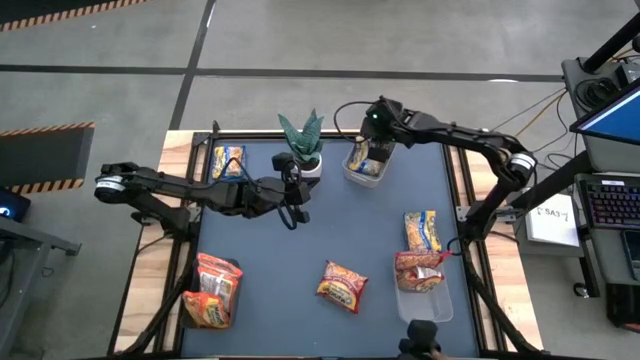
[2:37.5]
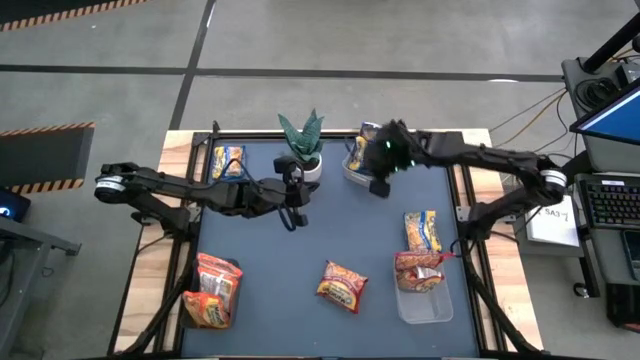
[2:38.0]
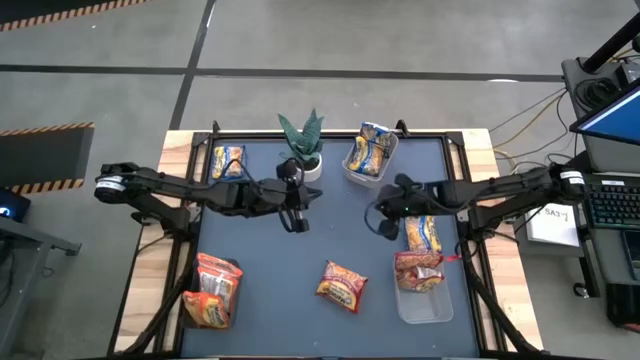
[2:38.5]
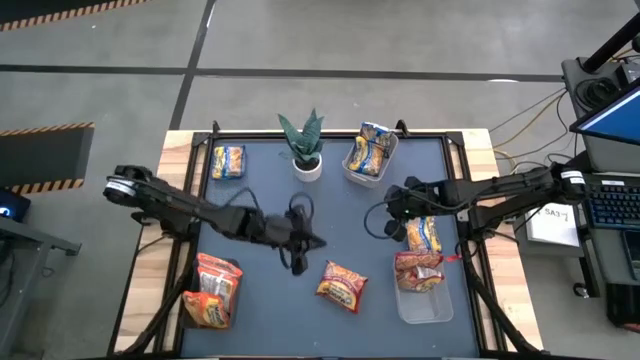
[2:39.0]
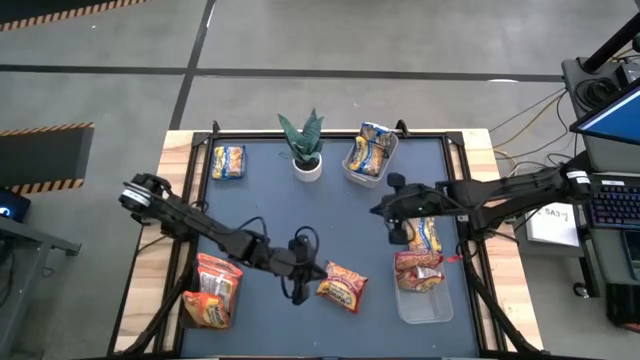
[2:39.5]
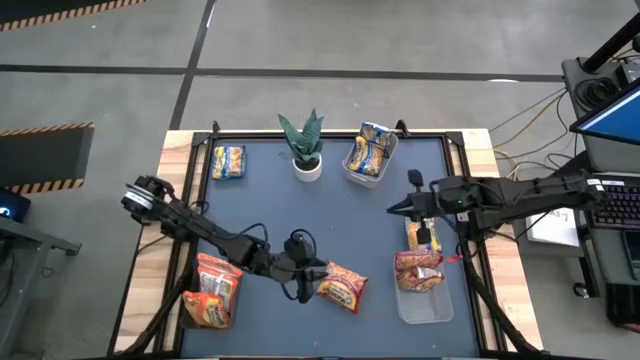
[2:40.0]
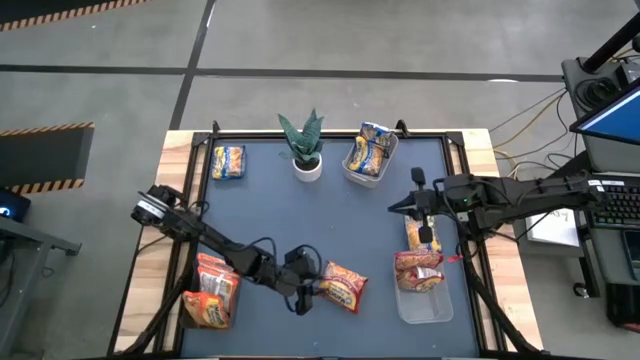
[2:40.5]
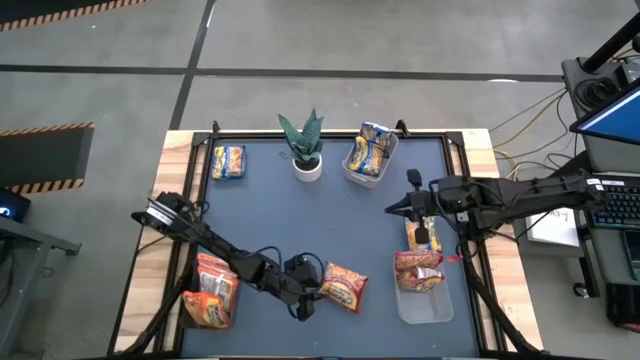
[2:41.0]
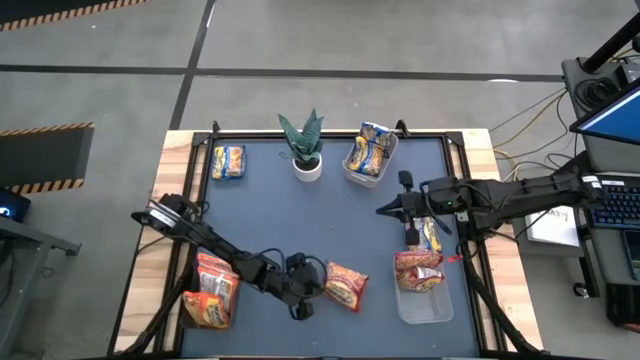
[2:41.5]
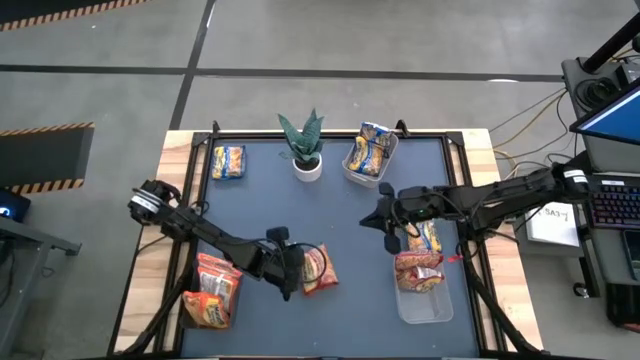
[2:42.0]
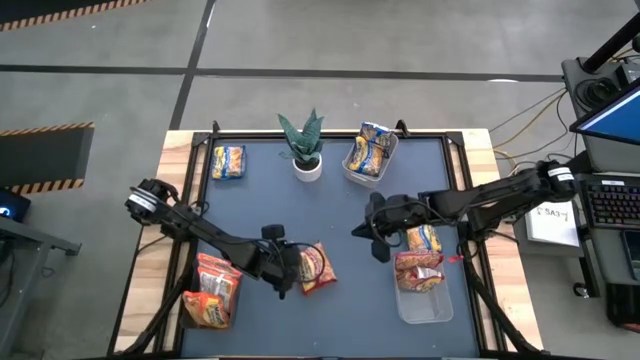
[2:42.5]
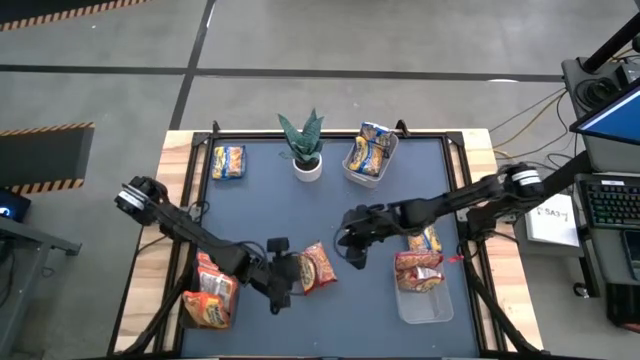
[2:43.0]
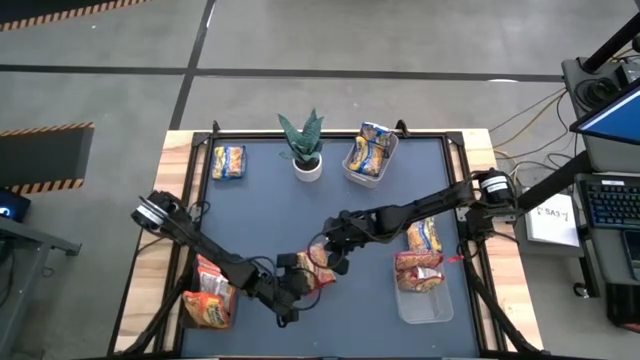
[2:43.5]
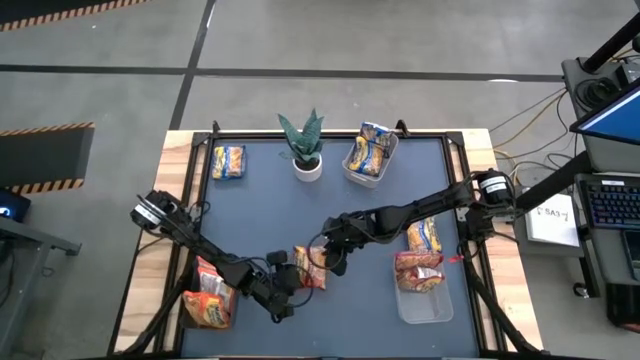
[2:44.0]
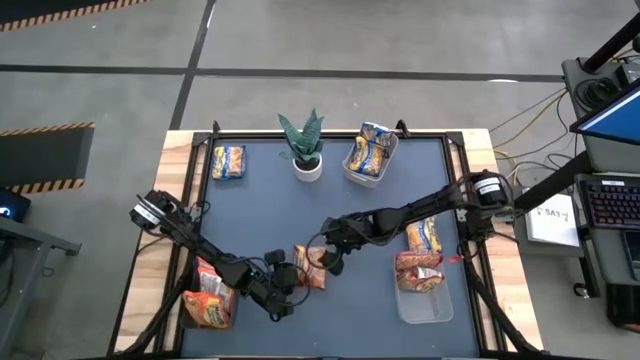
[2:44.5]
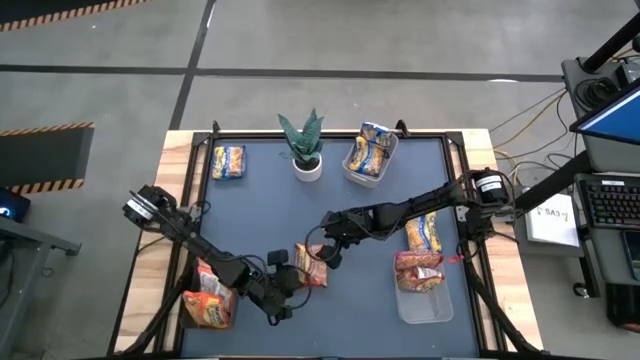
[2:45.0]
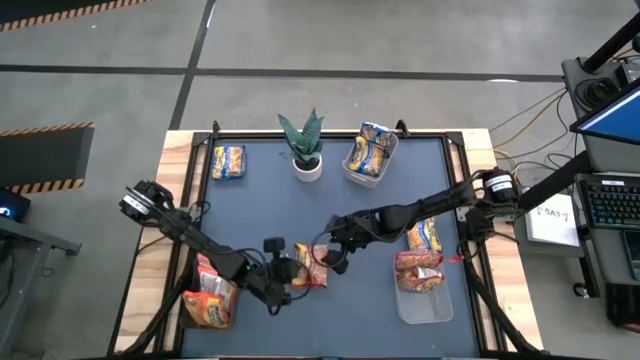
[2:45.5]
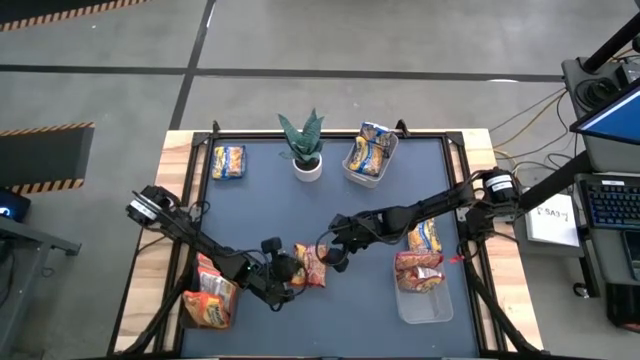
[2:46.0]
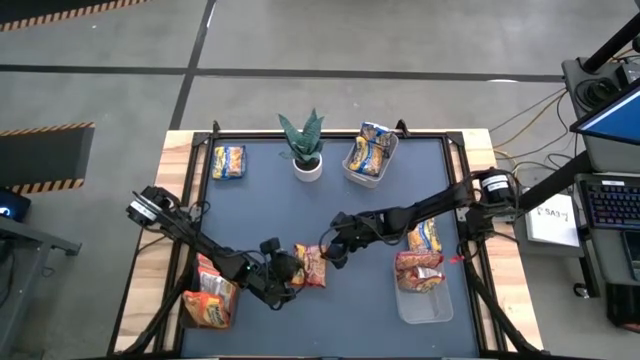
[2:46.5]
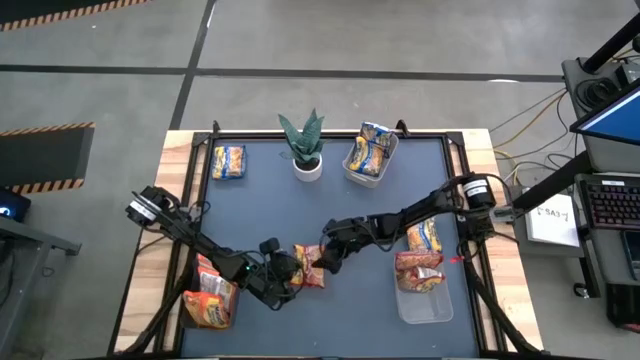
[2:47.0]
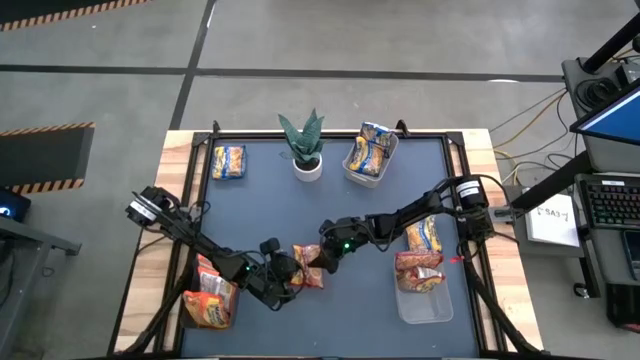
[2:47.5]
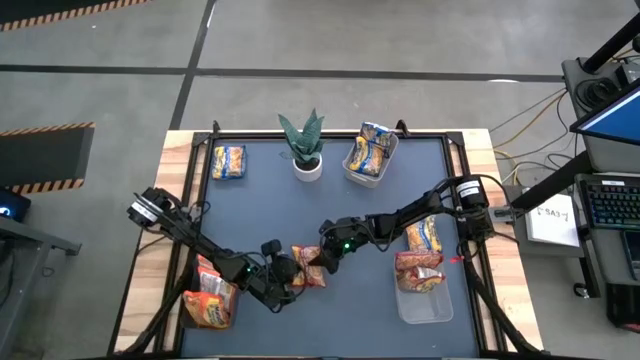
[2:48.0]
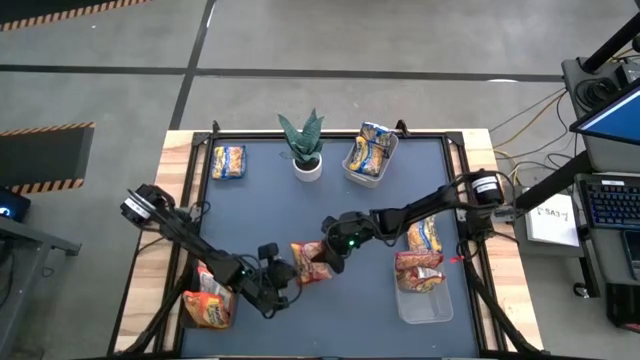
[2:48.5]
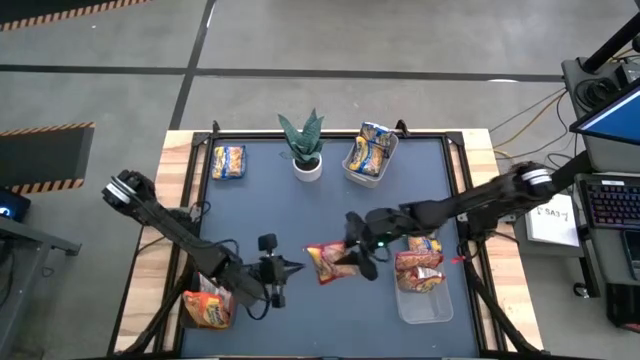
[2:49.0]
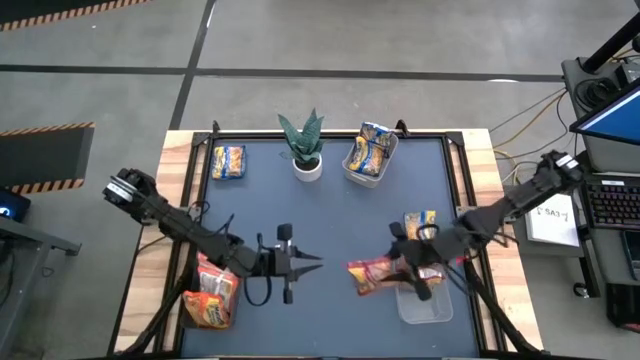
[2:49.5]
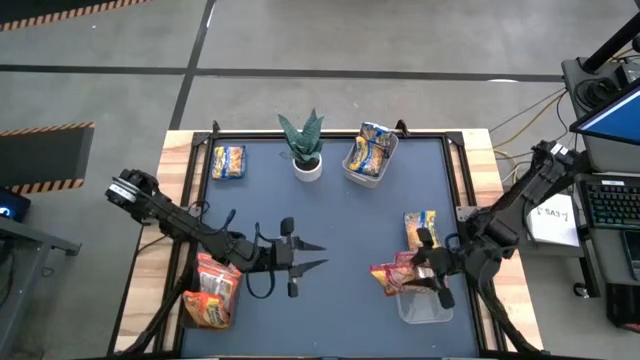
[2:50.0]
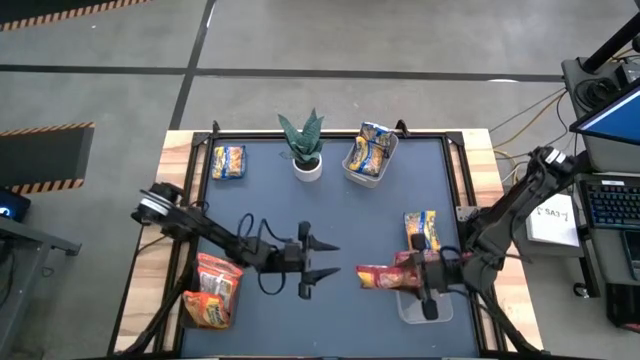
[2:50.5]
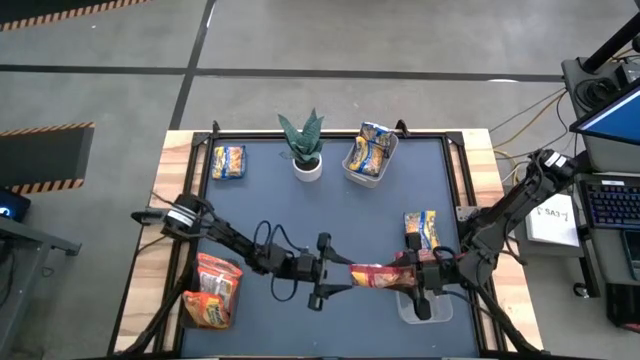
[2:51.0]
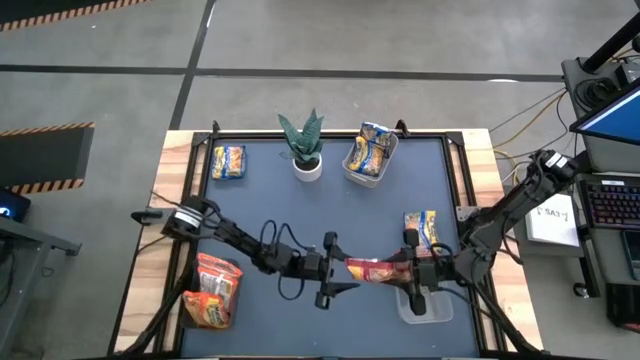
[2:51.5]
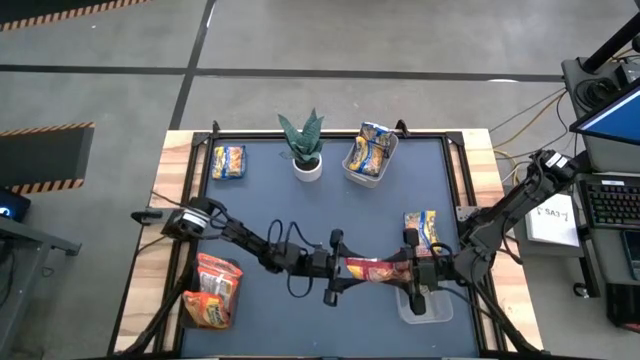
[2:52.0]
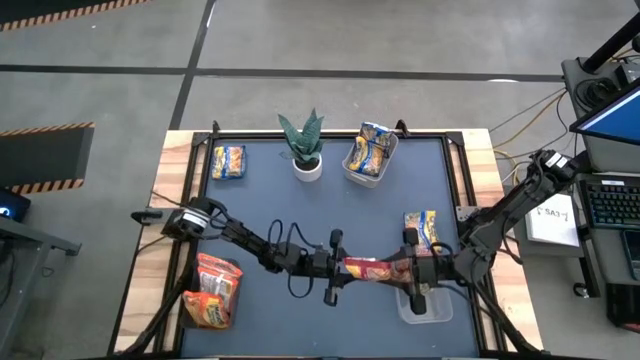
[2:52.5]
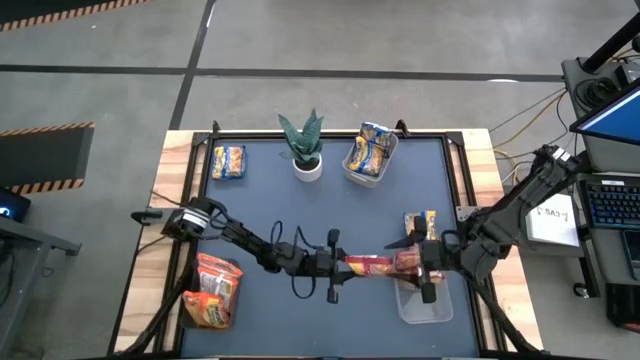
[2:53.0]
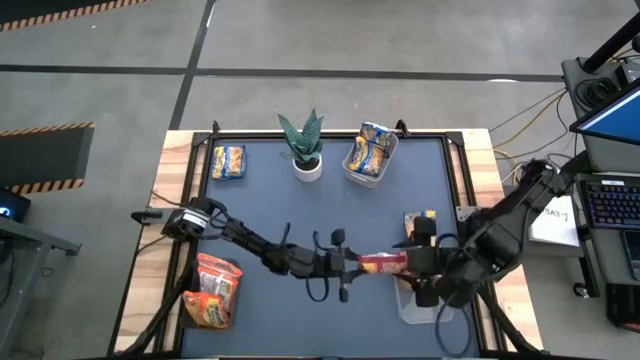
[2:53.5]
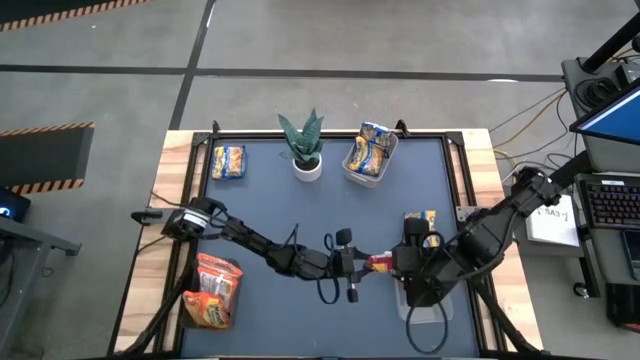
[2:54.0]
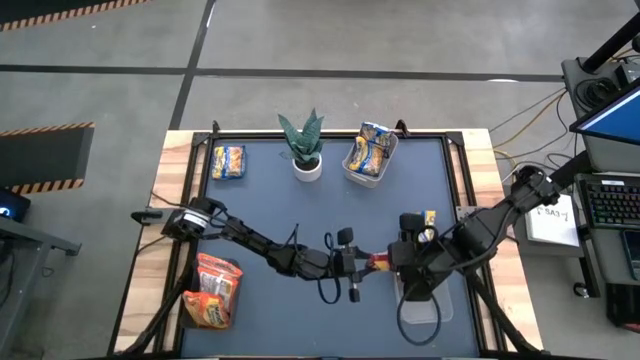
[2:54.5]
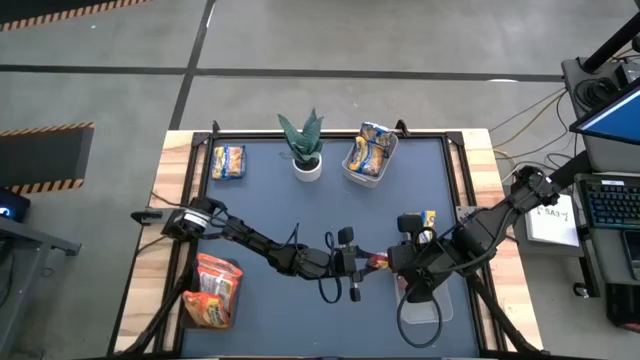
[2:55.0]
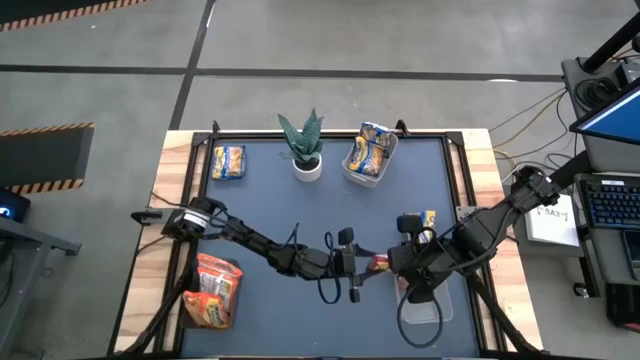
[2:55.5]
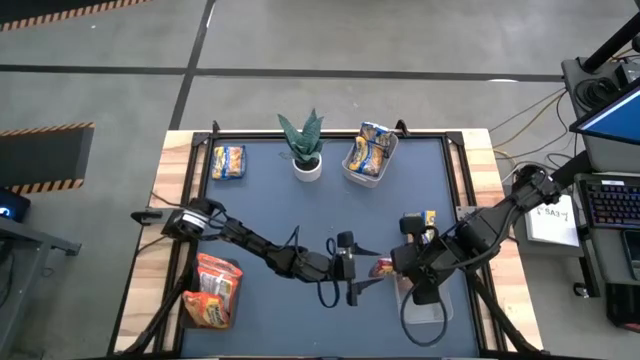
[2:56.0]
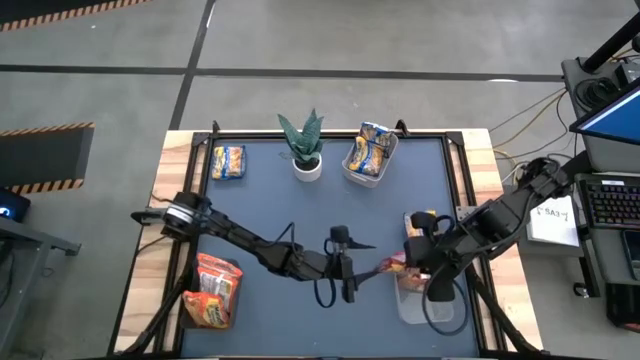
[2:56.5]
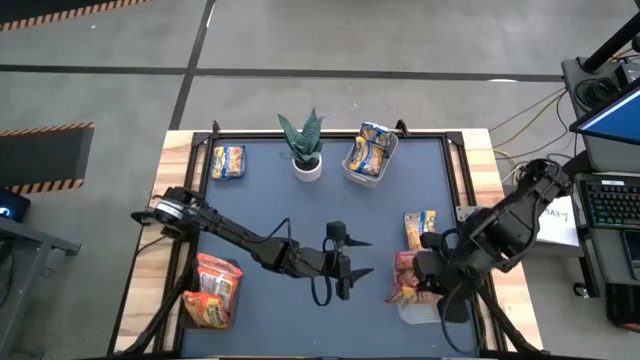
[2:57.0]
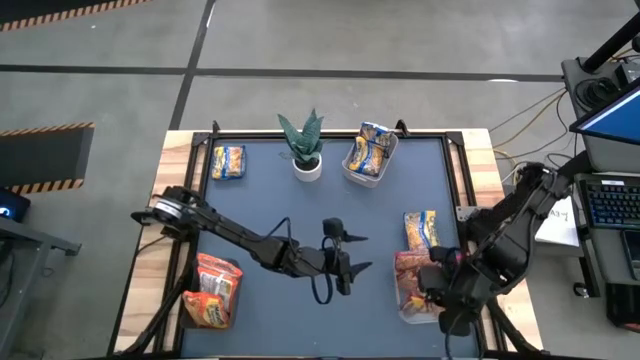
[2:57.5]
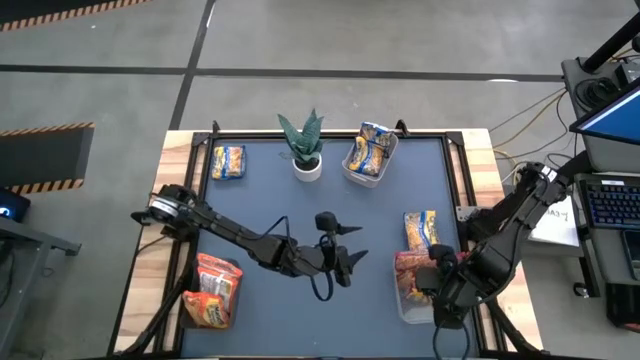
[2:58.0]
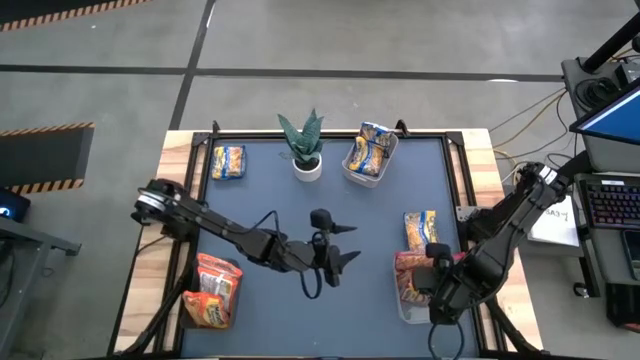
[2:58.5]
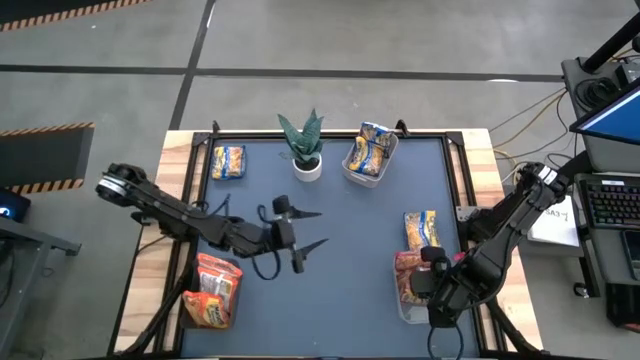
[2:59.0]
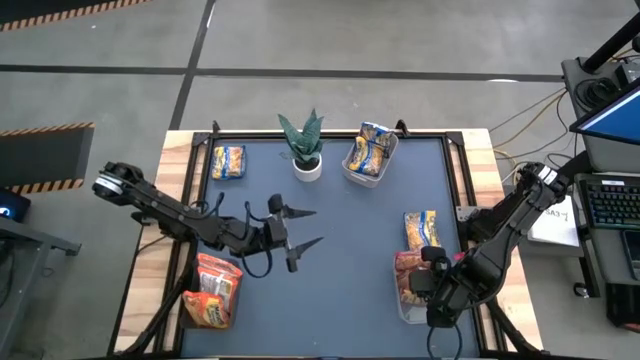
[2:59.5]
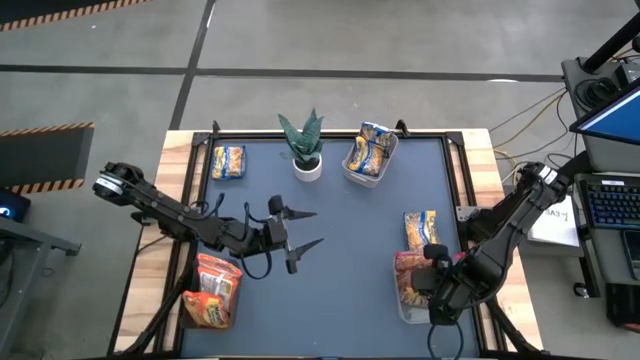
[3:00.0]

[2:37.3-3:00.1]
Task: Sort Maruchan noodles
Put the red instant noodle pack into the transparent bin
